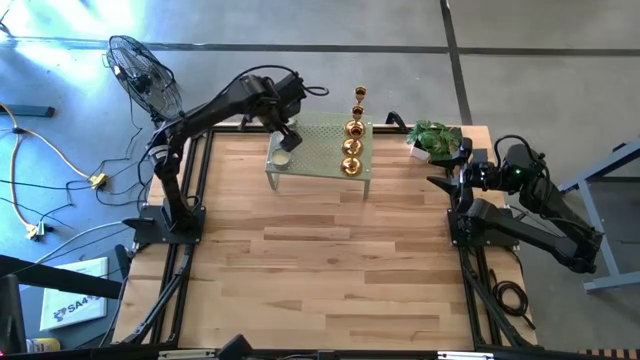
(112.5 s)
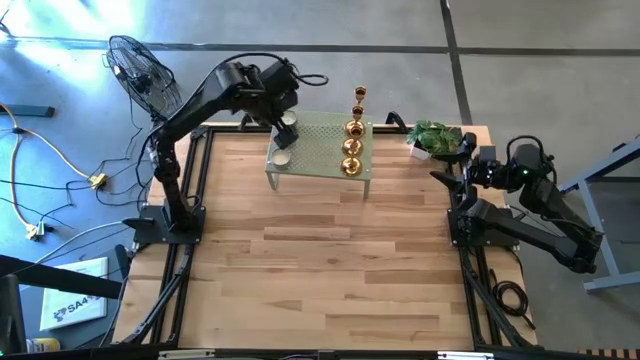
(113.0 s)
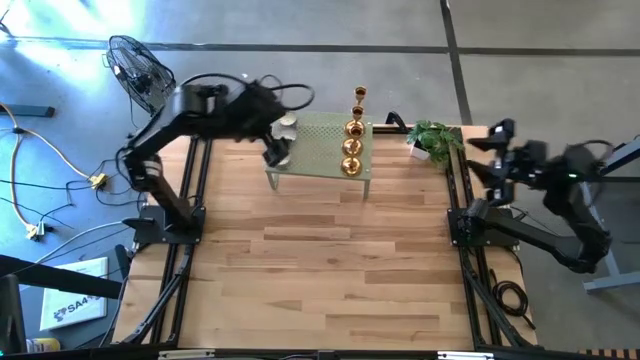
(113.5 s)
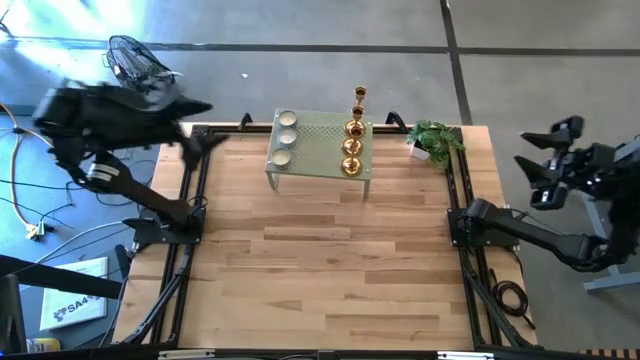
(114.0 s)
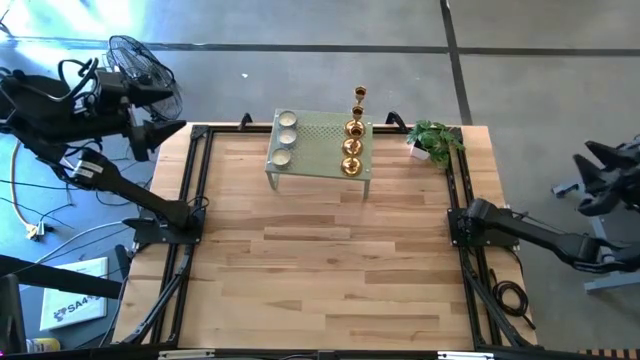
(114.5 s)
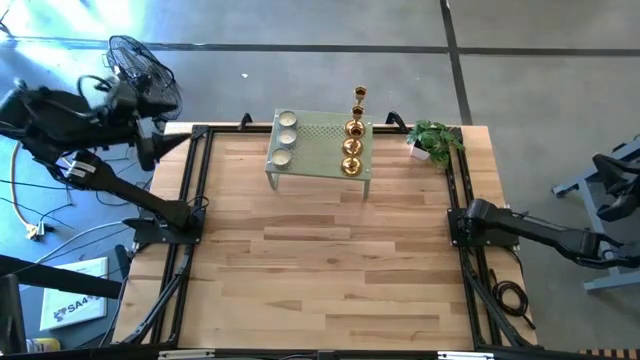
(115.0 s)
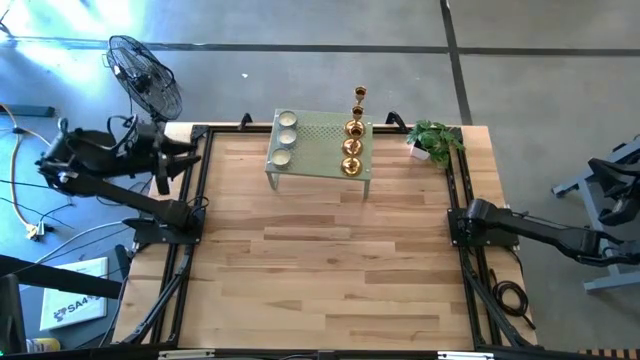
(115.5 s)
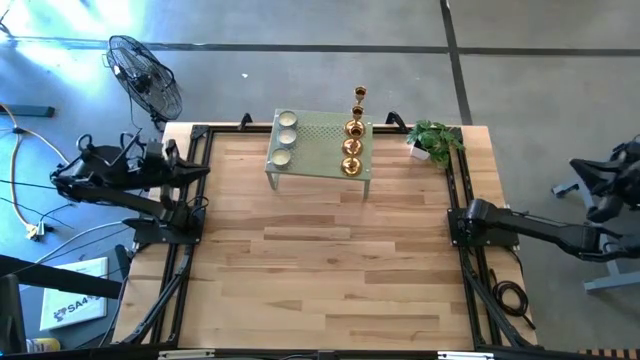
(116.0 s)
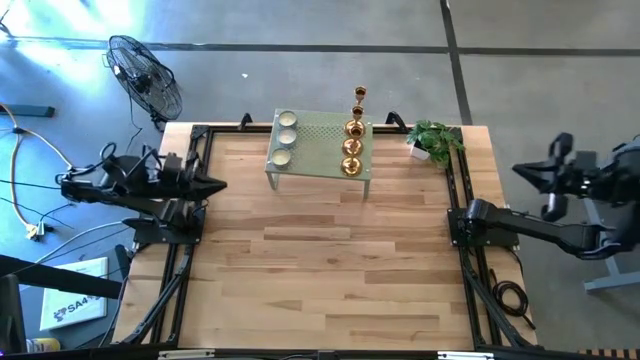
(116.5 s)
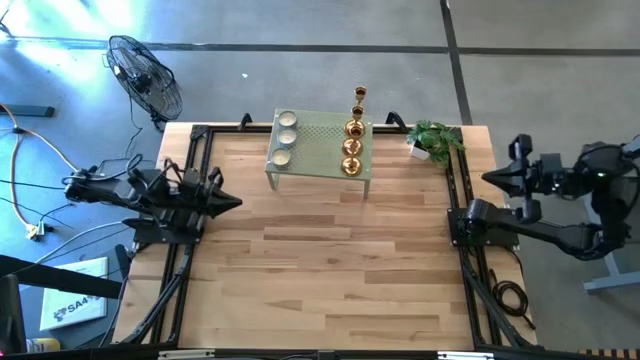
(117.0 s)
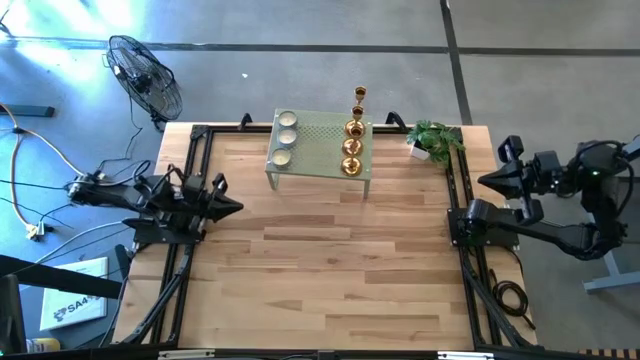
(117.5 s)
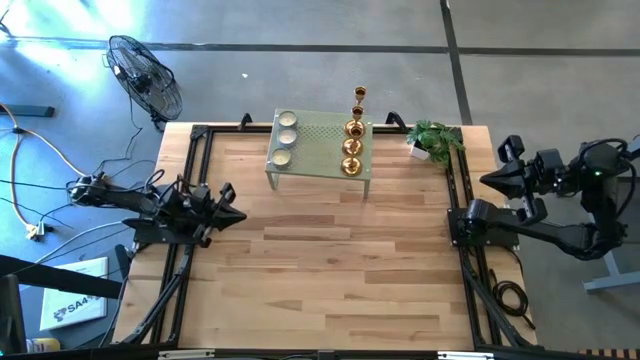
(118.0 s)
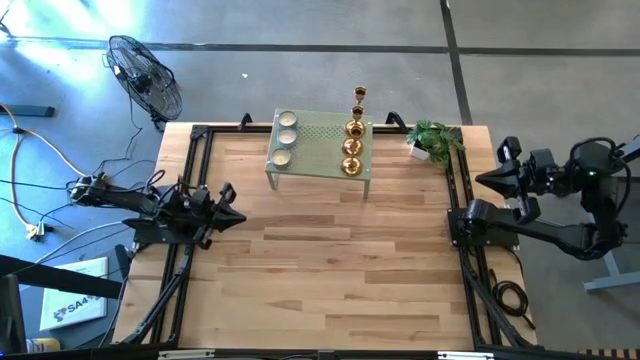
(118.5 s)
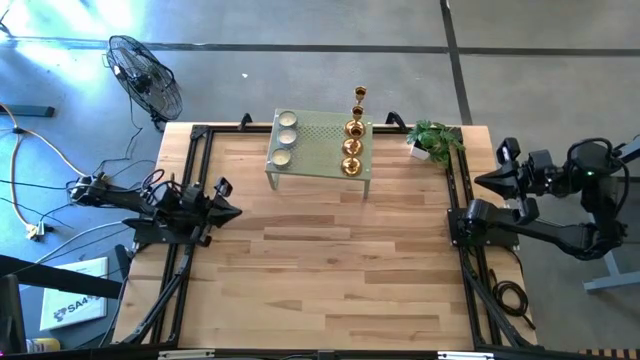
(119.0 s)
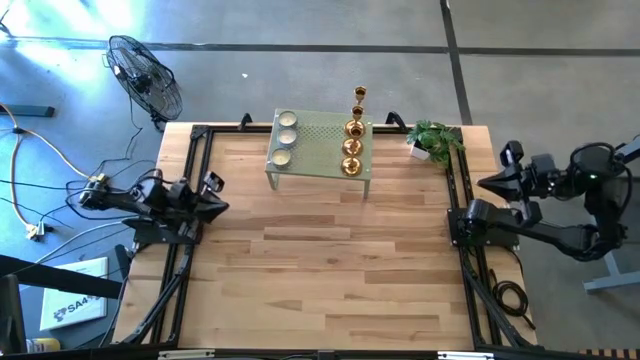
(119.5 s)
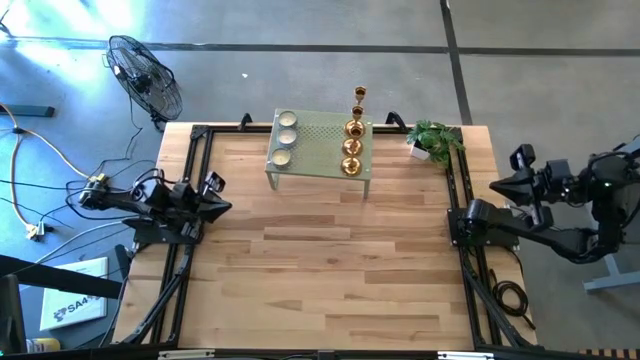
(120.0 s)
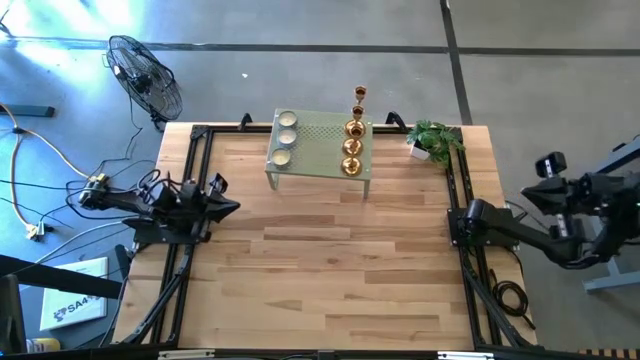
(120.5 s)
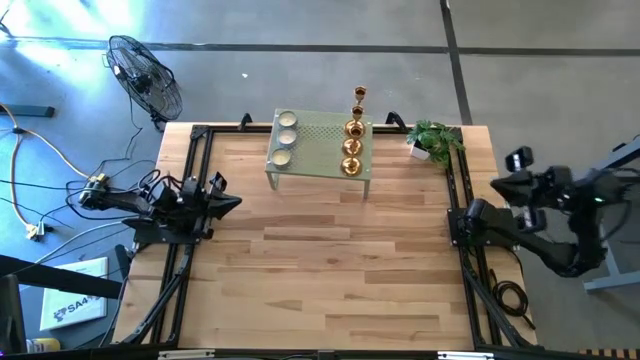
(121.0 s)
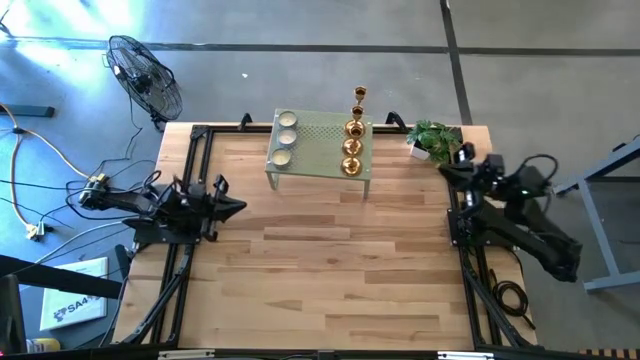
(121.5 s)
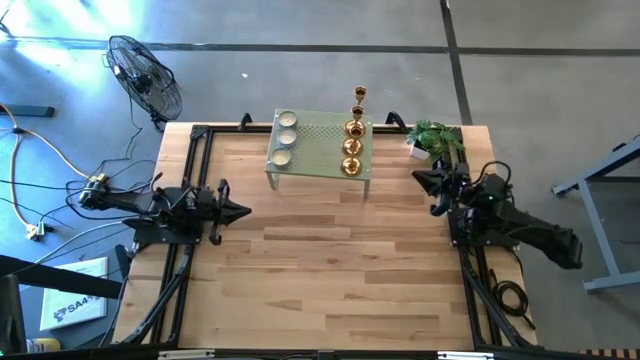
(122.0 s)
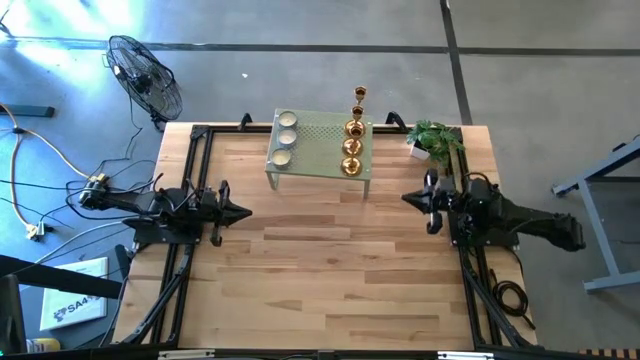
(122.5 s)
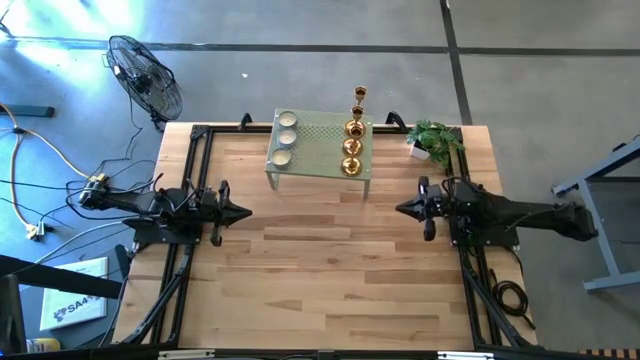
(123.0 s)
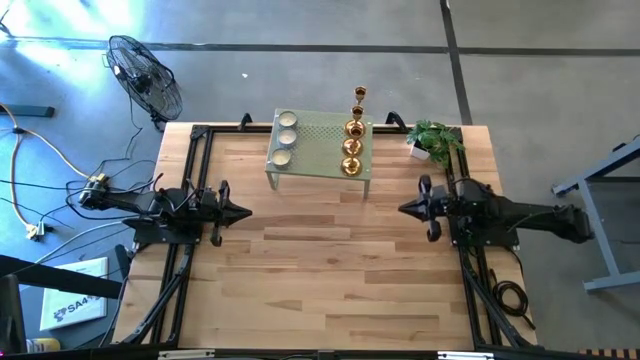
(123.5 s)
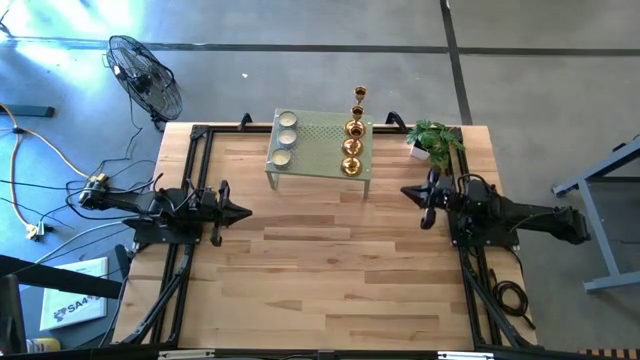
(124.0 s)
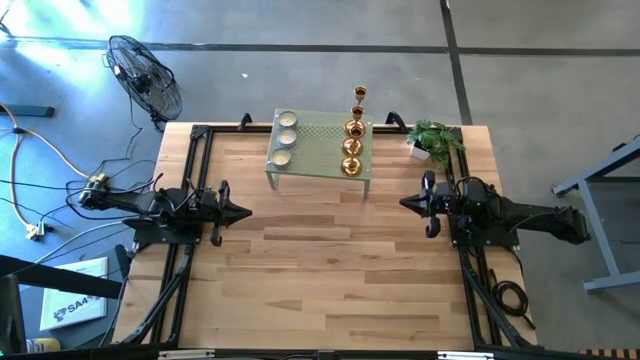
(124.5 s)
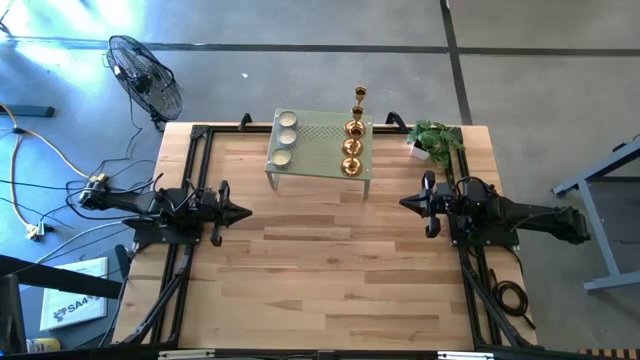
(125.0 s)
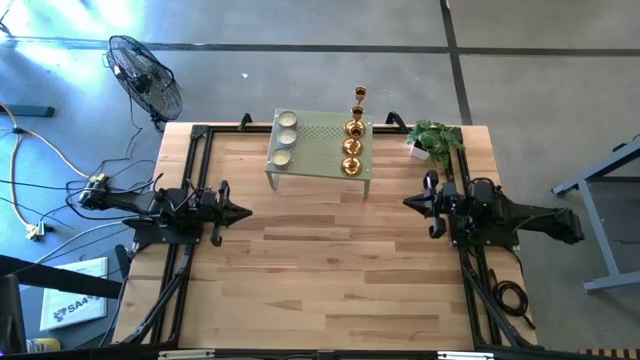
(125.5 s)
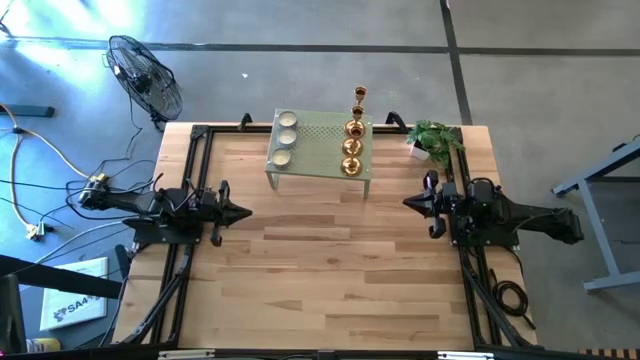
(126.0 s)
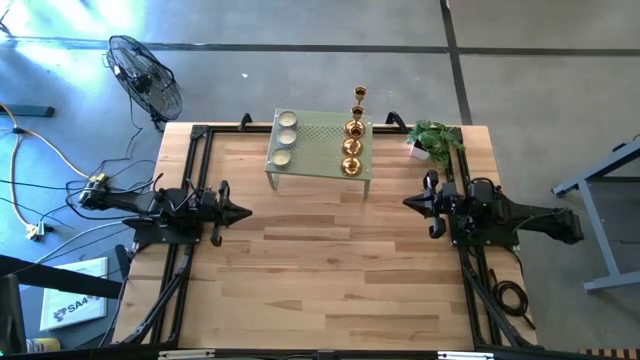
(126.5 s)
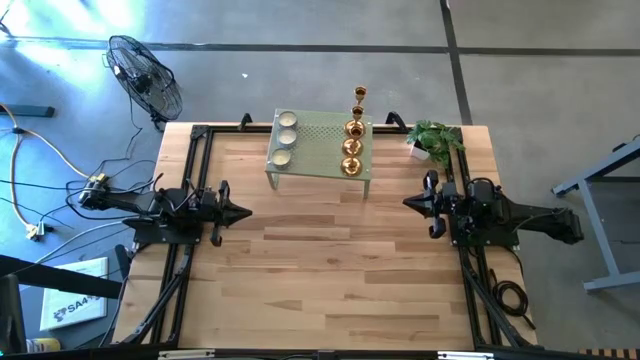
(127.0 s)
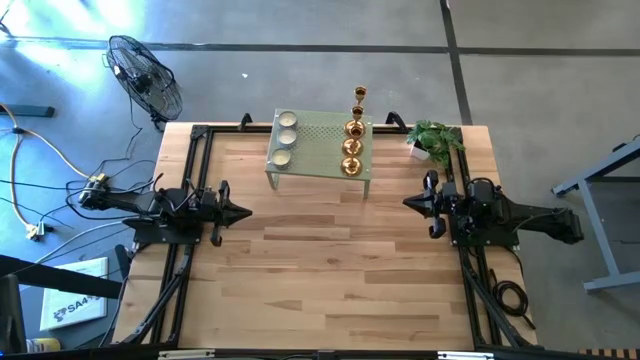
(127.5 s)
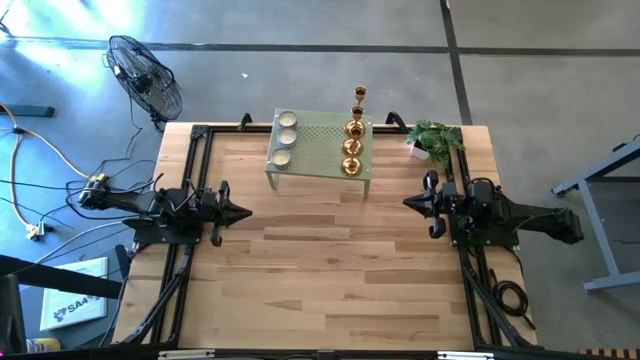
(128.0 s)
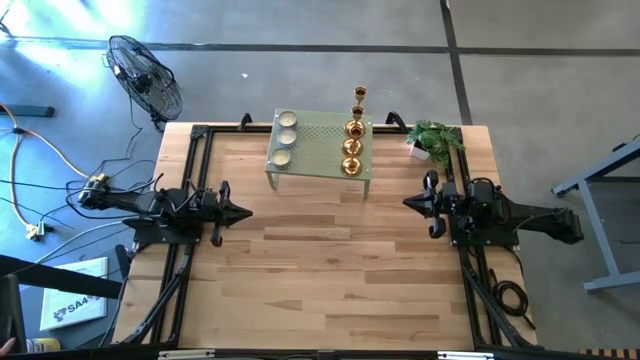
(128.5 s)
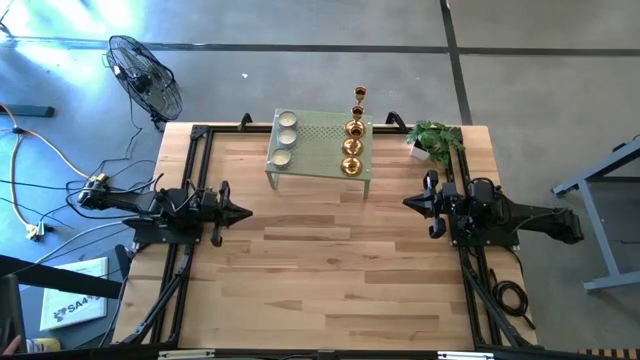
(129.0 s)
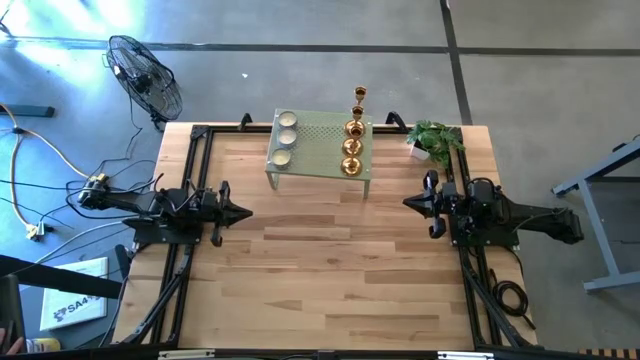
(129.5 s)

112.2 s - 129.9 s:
Task: Stock candles and holders on shelf
Return to Home Position

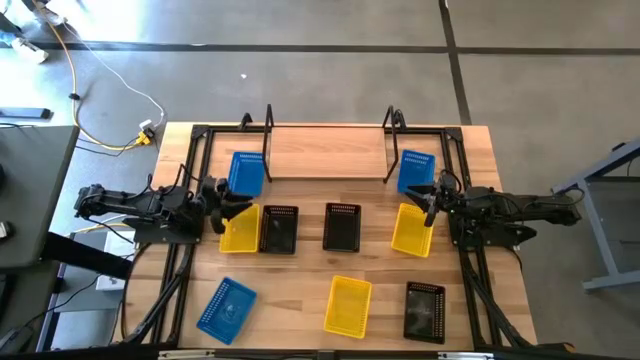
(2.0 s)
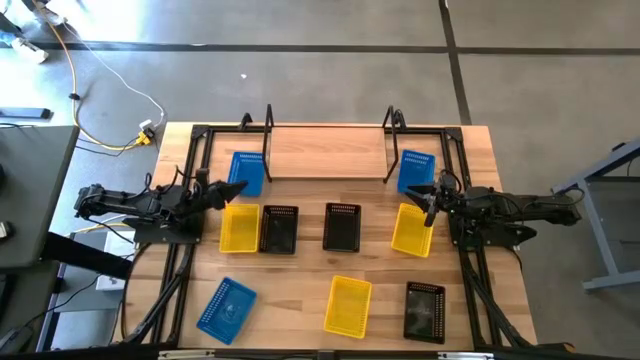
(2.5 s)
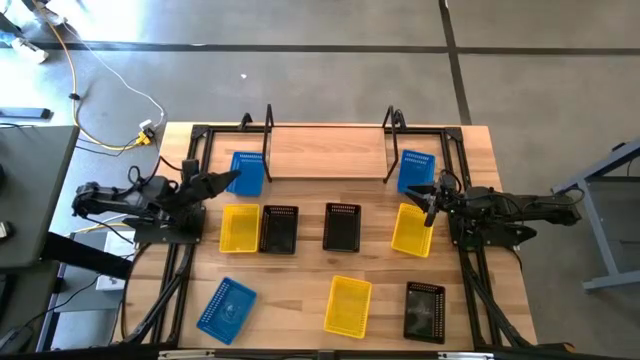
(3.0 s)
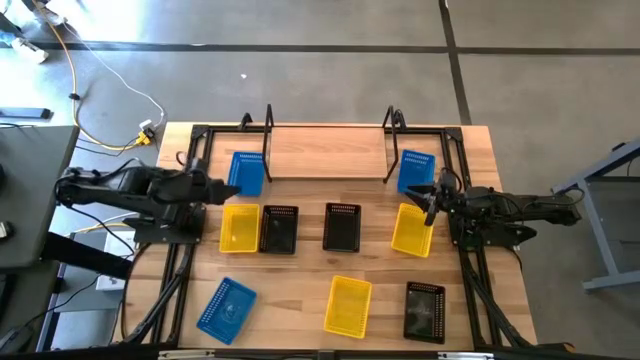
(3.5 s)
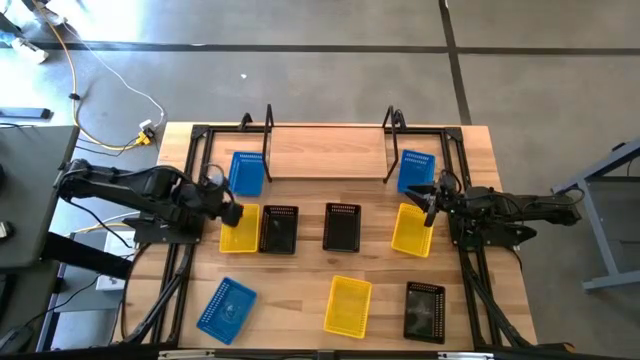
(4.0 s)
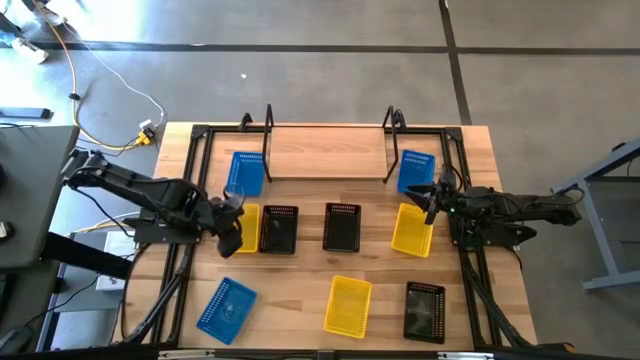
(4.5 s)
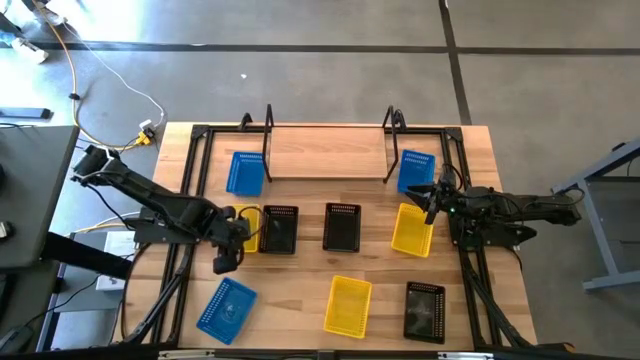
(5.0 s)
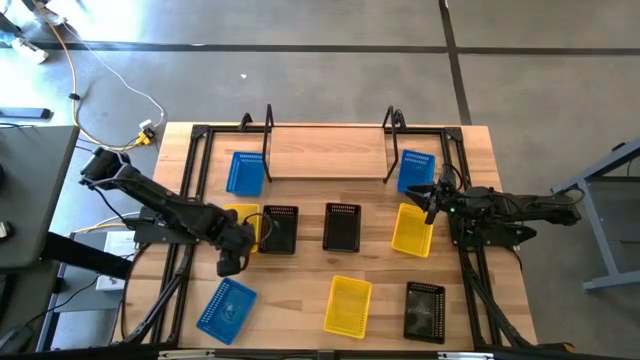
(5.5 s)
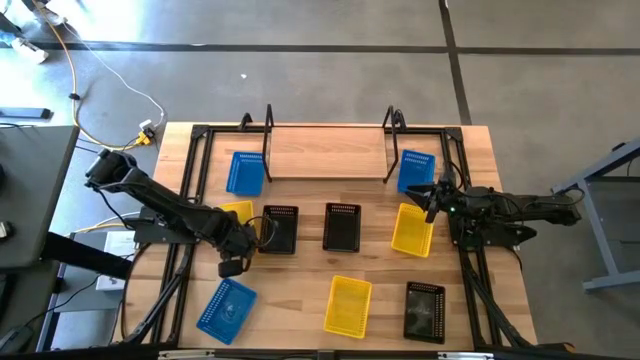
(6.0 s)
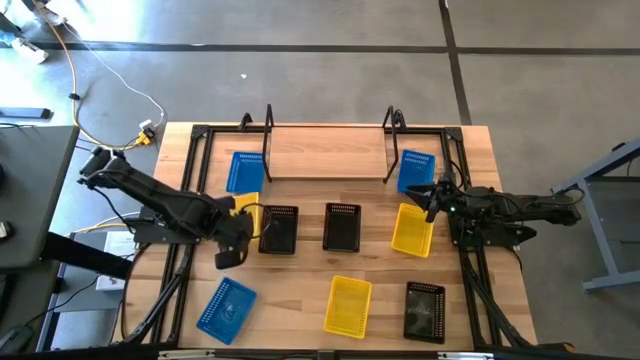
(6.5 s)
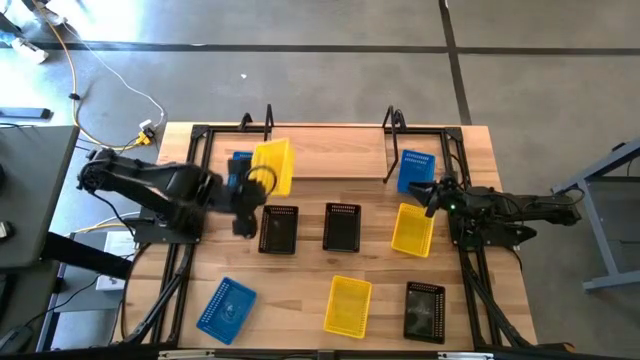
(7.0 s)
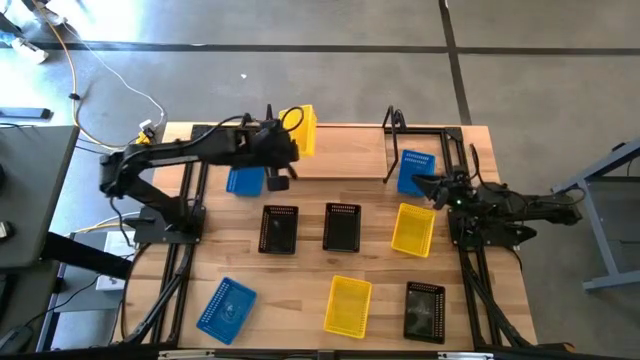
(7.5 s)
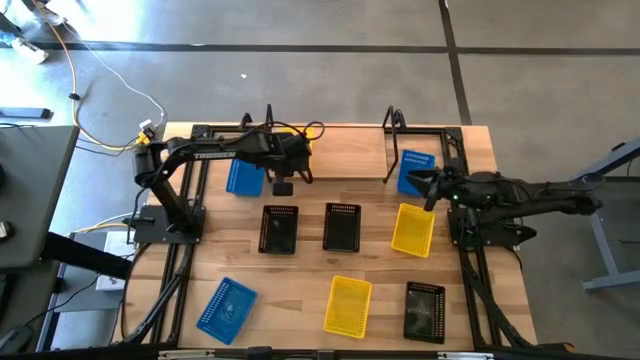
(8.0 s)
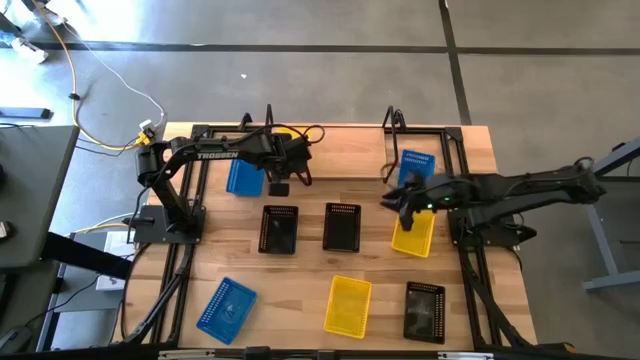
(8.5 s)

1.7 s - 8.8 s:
Task: Stack baskets on shelf by color
Put the top left yellow basket on the shelf
